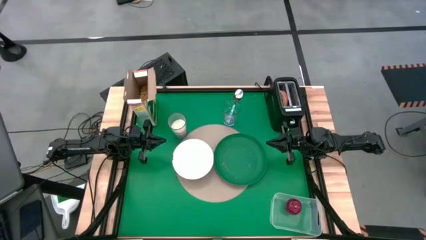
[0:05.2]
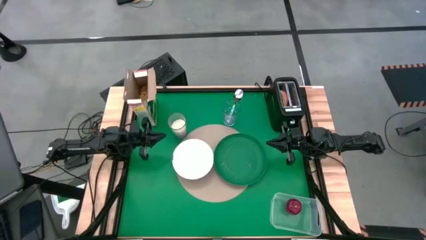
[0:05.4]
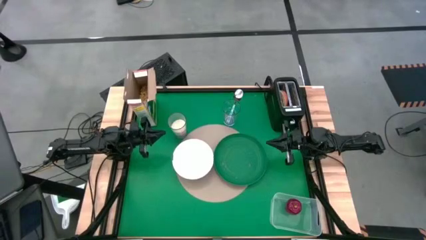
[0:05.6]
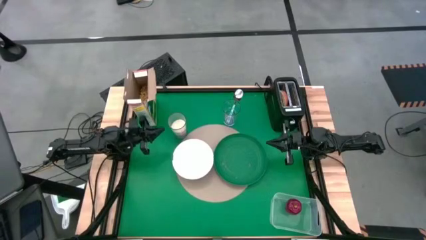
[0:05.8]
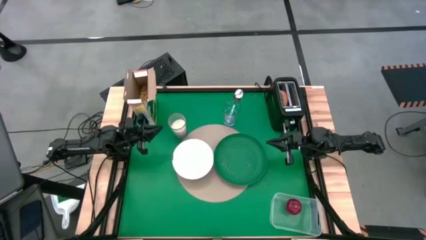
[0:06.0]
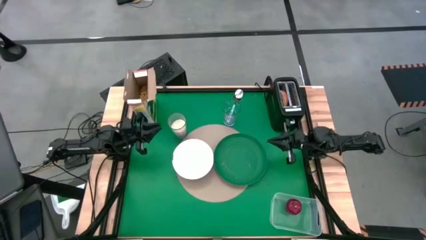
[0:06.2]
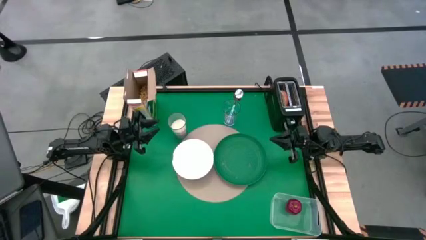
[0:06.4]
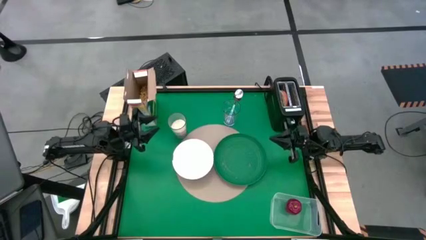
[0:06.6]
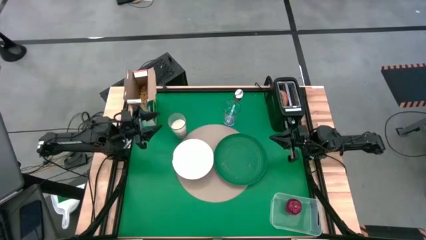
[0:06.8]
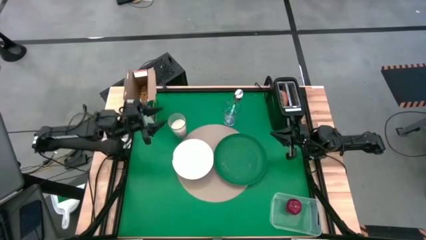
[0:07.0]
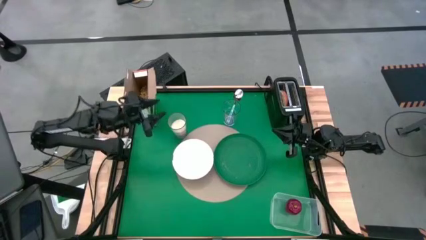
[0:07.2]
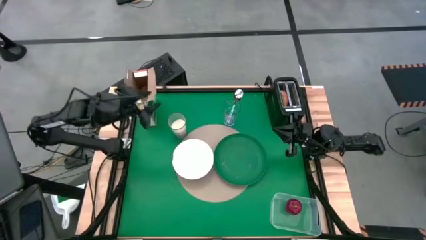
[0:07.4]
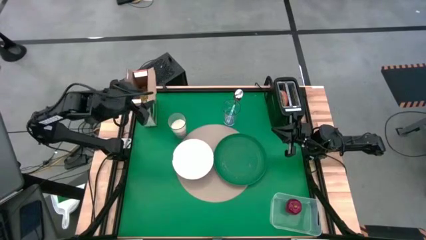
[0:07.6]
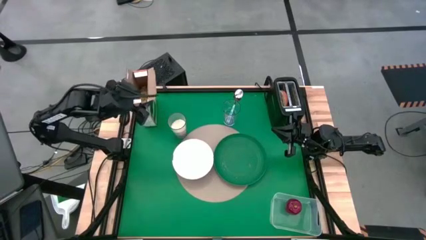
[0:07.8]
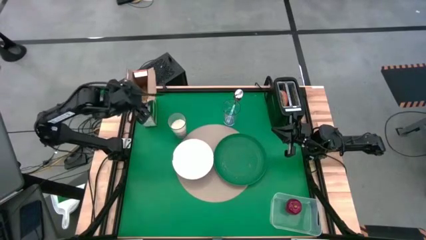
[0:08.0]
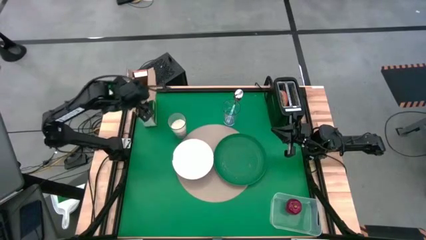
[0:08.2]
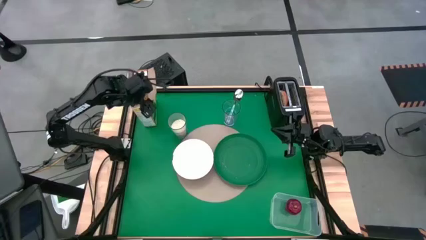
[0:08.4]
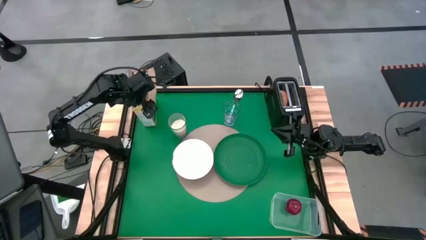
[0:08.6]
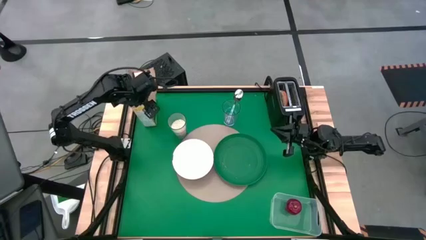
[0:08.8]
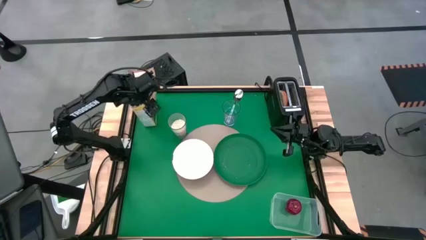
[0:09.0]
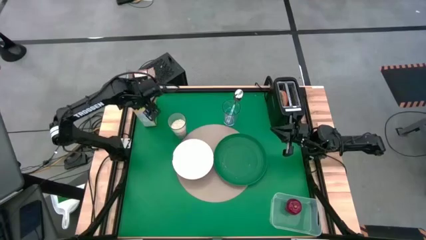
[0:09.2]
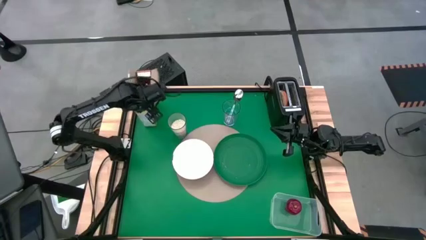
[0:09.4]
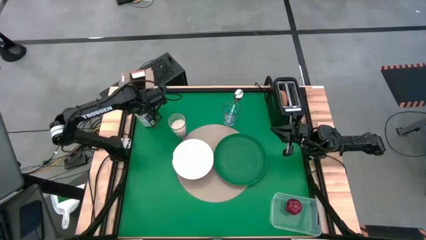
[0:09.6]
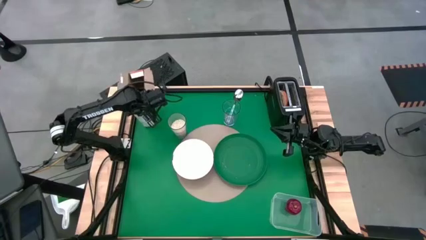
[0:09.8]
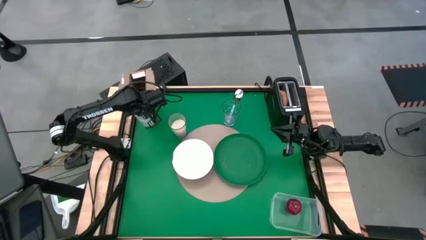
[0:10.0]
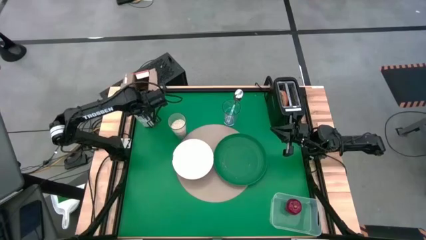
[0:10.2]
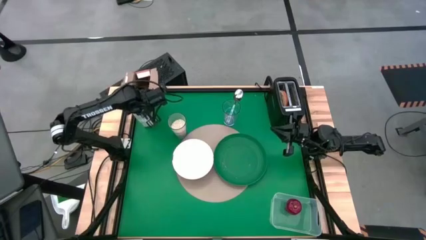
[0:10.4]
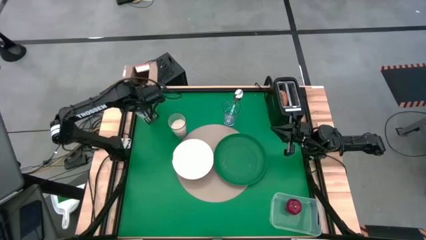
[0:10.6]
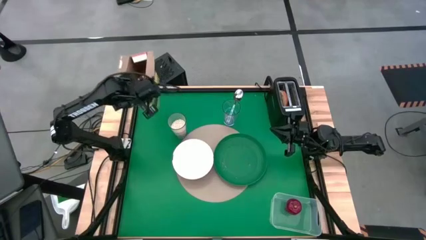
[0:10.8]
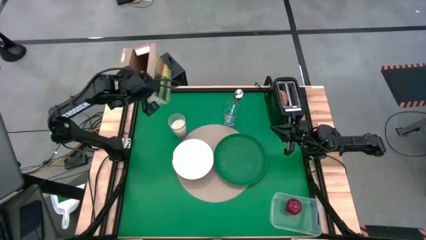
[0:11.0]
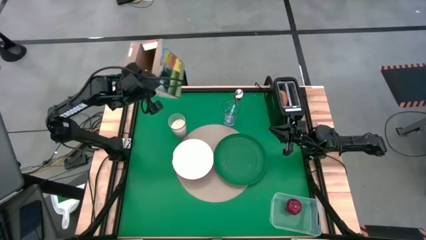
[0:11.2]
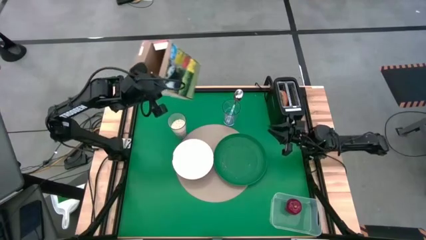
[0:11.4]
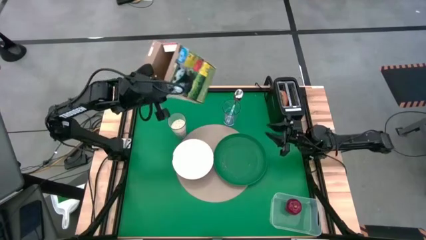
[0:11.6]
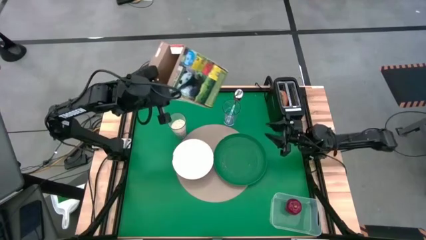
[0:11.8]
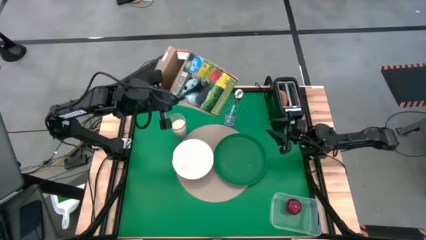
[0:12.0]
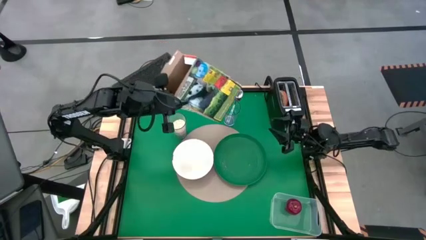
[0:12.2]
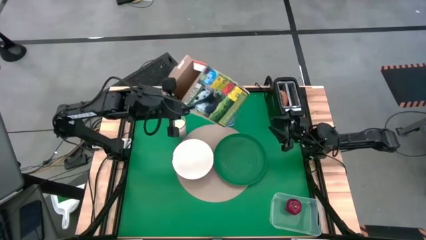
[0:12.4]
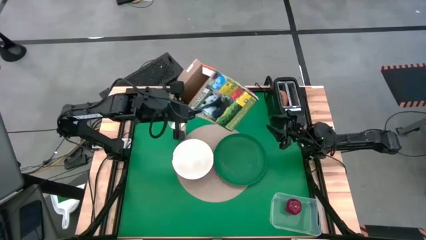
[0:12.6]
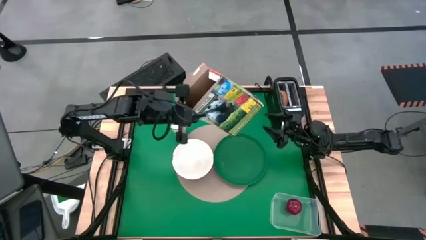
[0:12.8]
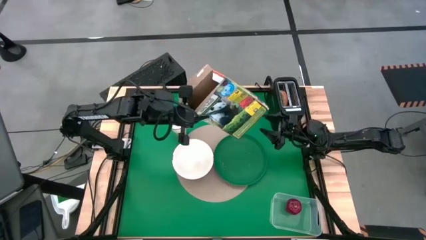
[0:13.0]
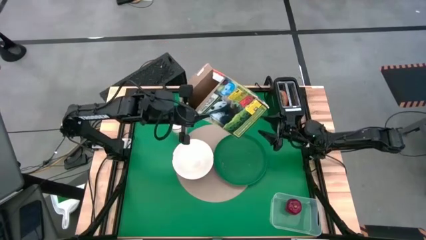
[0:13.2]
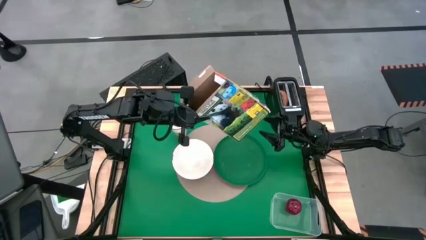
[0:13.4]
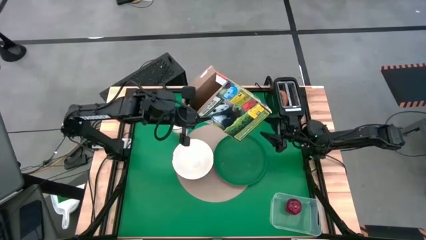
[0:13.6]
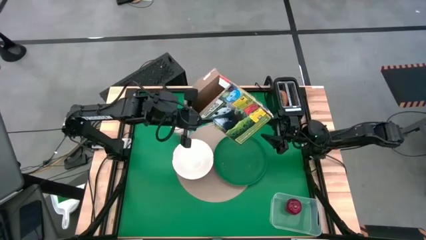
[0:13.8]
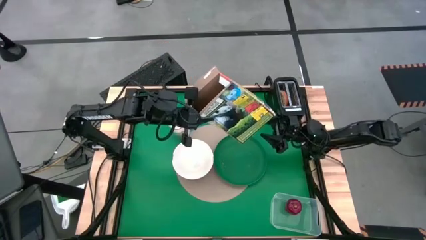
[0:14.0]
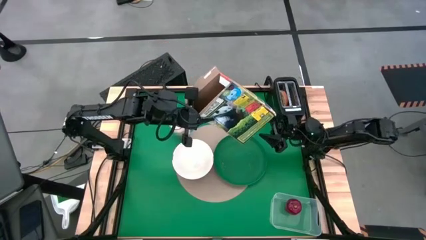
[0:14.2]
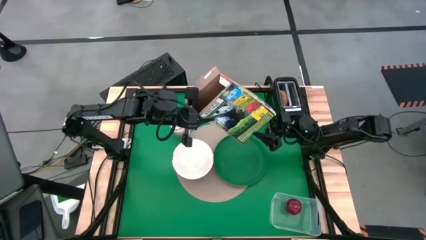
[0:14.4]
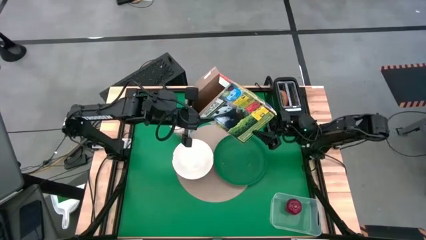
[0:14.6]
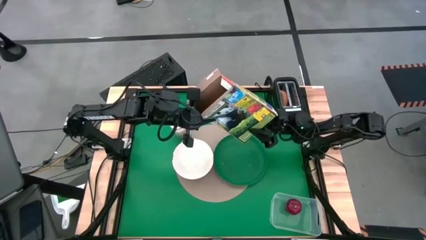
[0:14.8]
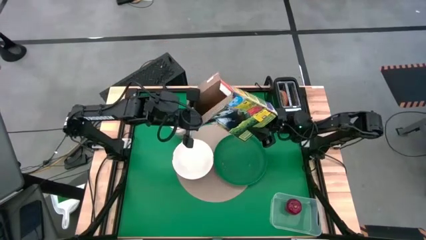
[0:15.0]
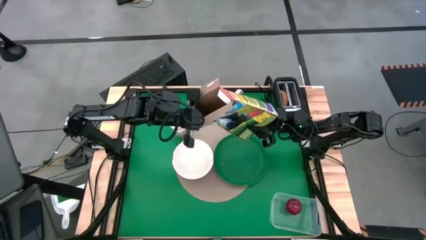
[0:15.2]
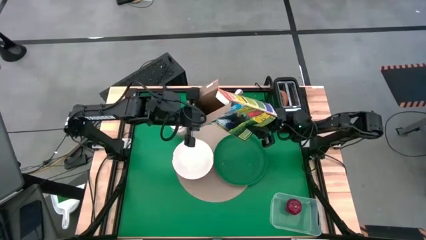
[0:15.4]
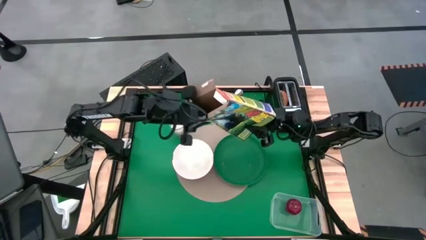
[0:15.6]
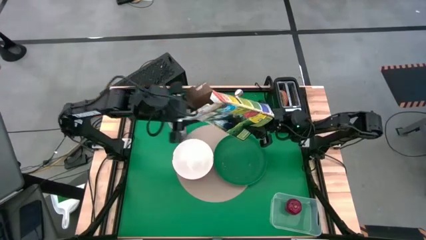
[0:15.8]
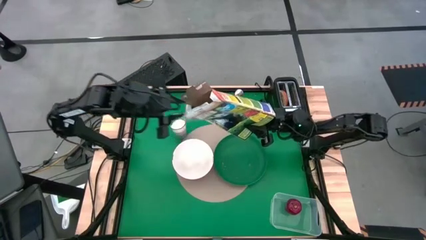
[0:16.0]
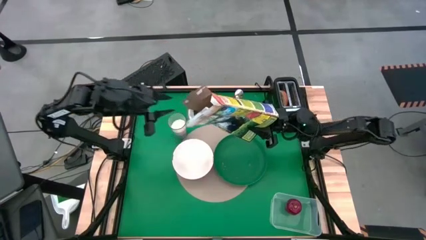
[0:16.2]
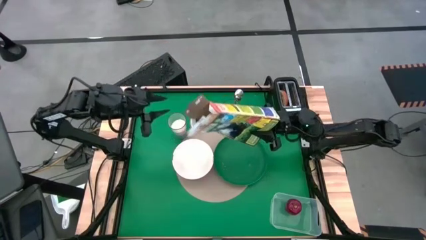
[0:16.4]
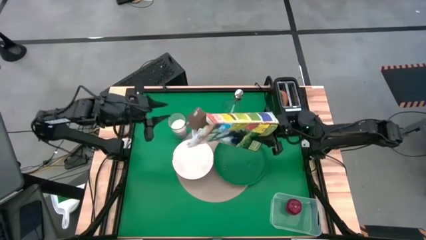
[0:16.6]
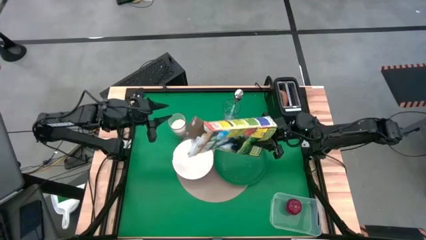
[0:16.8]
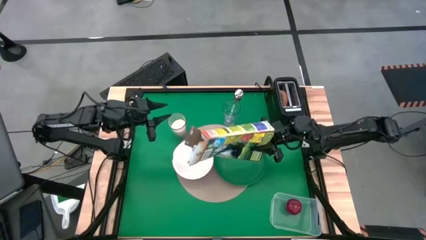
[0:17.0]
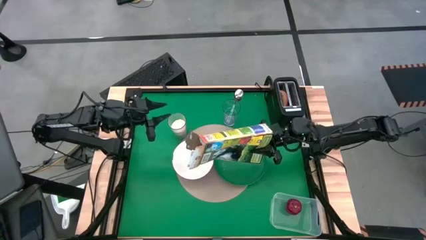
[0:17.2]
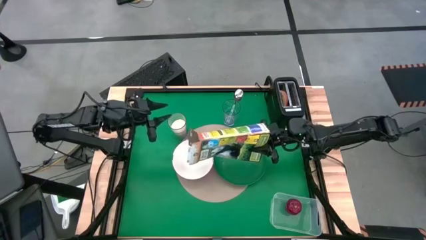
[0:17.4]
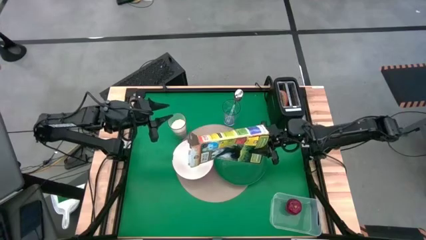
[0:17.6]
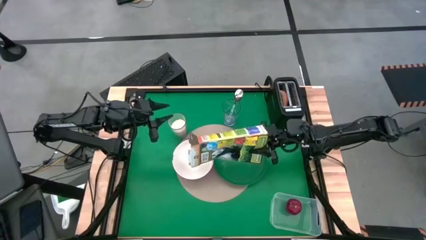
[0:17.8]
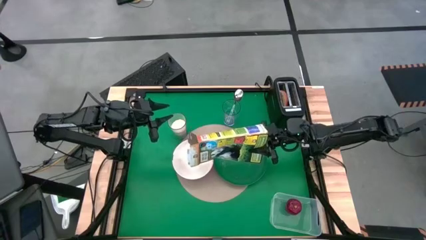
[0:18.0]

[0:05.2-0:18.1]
Task: Arrange a breakfast setting
Pour the cereal into the white bowl

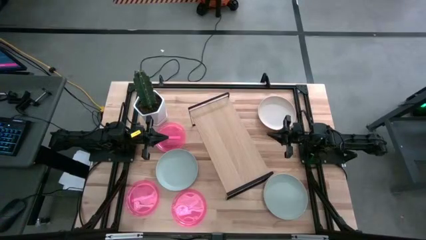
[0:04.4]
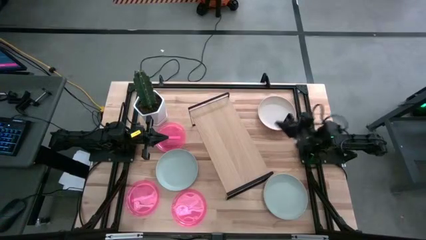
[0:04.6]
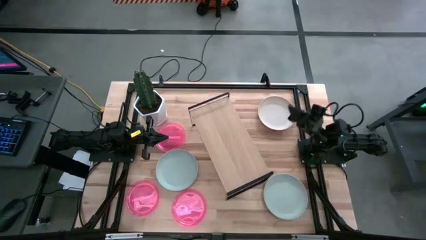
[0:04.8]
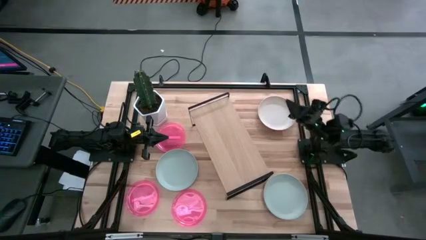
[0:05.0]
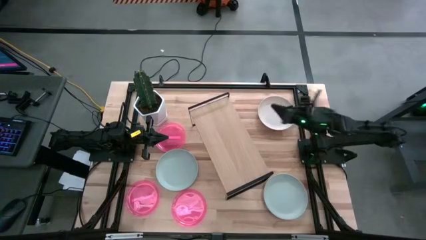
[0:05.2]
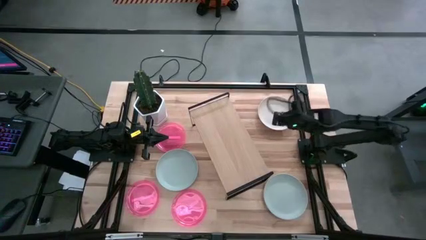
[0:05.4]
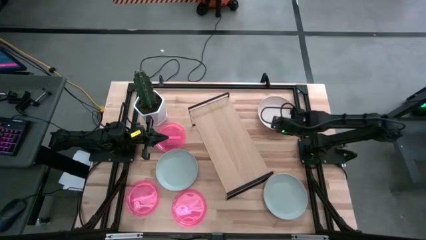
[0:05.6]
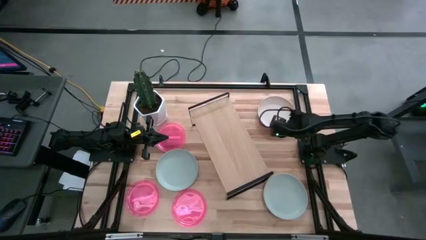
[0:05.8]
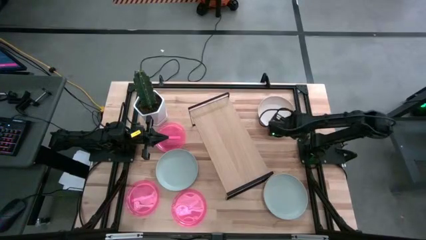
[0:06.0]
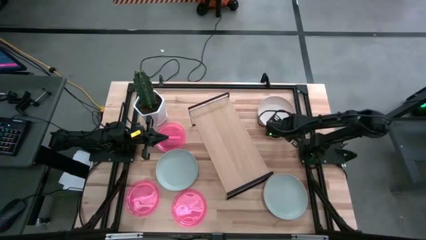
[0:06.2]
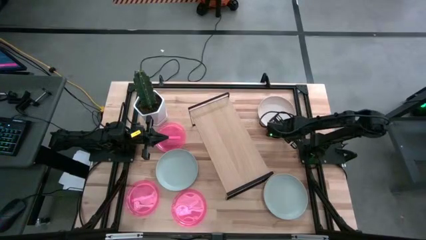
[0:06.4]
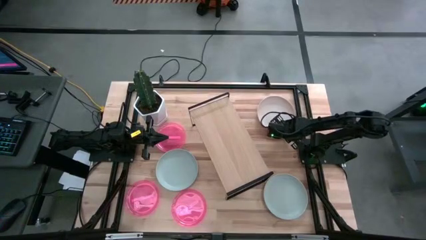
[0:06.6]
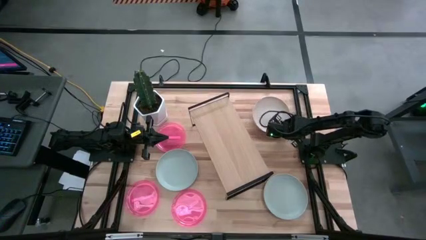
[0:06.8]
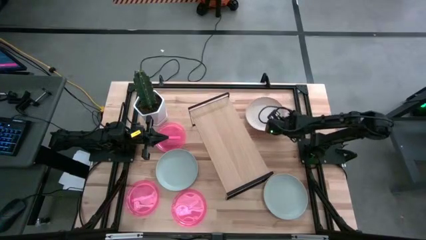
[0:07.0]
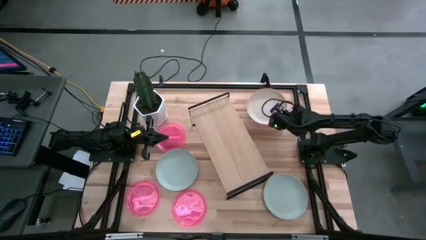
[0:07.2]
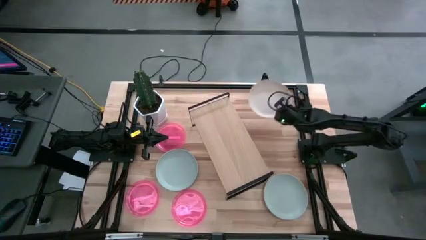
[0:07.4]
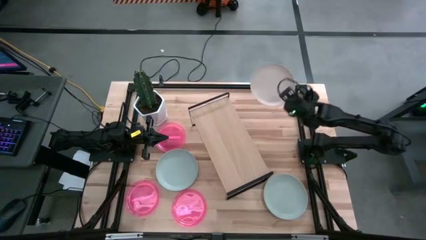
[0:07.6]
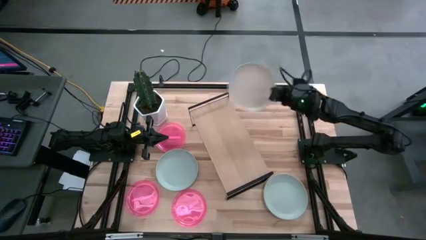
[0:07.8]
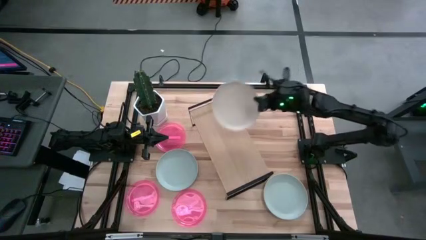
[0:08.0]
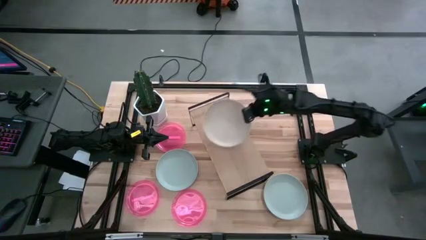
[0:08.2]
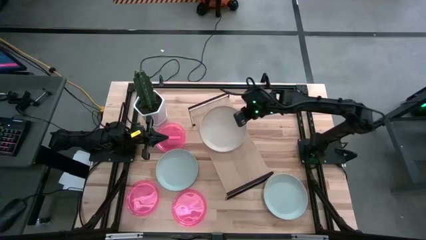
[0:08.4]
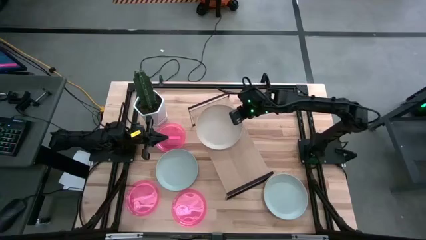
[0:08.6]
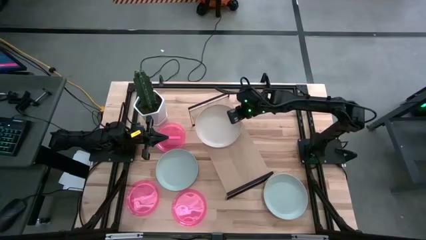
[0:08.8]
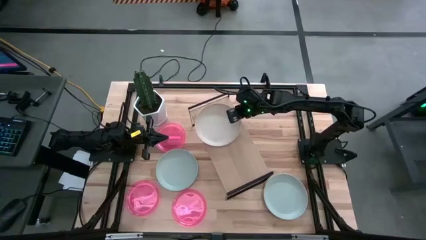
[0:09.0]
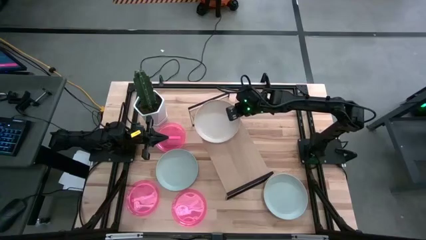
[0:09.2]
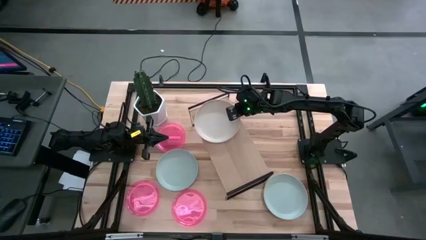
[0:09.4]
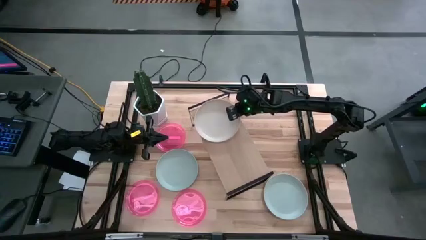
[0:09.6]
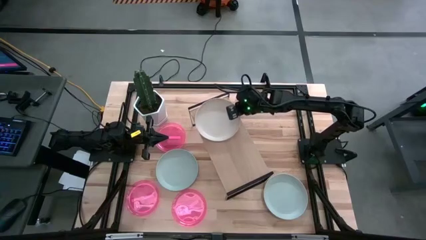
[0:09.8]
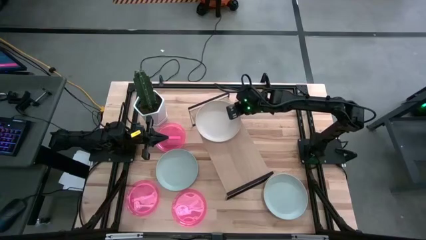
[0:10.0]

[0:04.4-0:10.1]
Task: Place and stack plates onto a shelf
Put the white plate on the shelf
